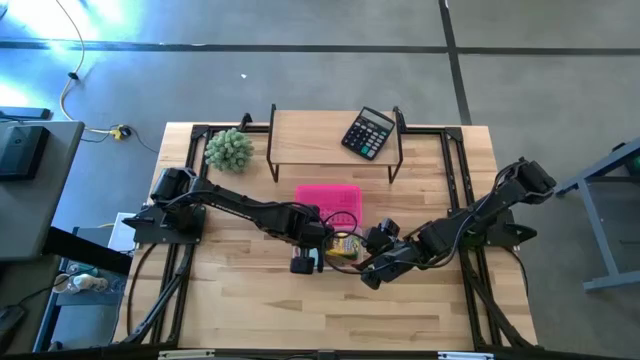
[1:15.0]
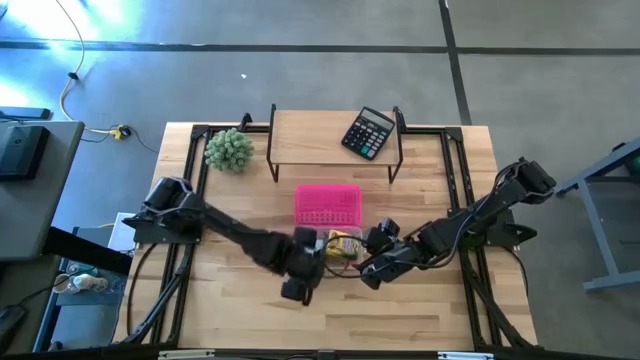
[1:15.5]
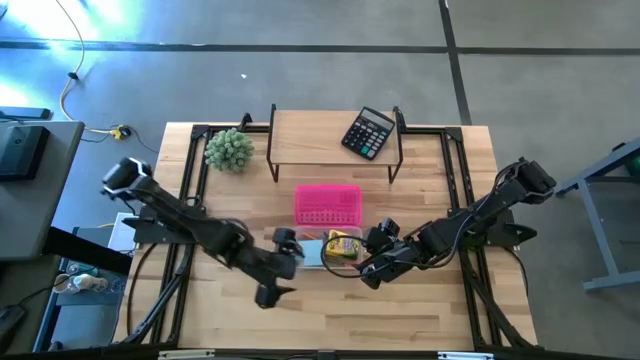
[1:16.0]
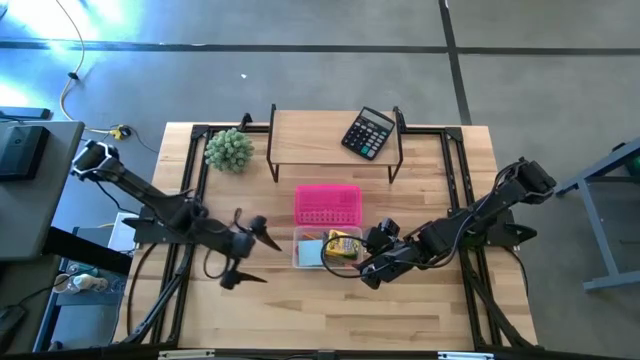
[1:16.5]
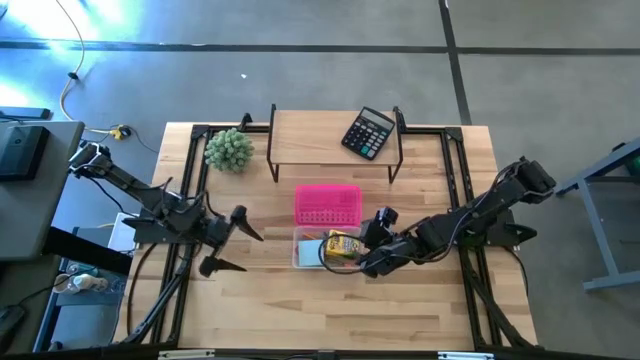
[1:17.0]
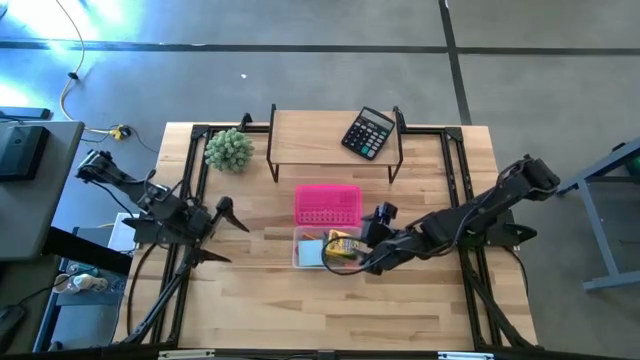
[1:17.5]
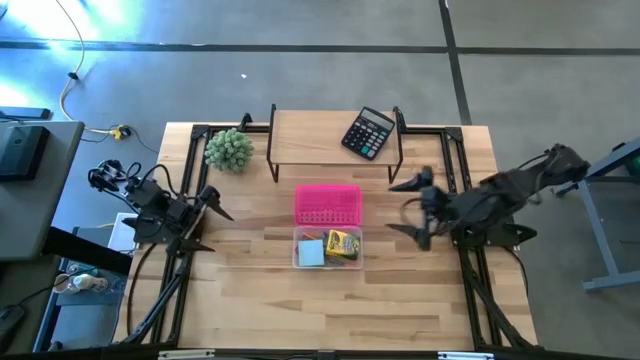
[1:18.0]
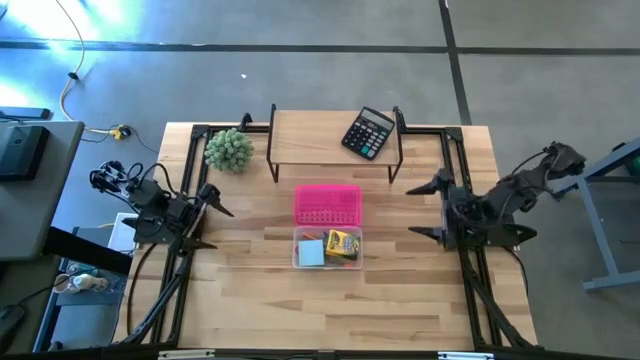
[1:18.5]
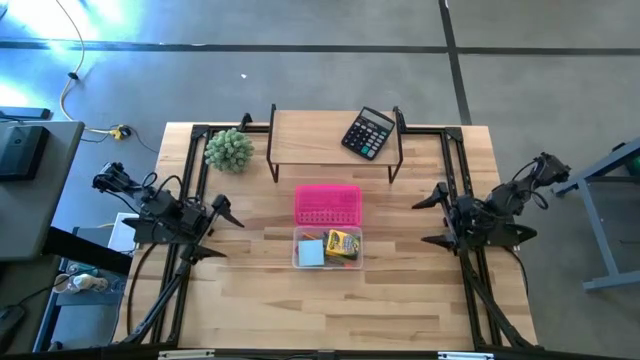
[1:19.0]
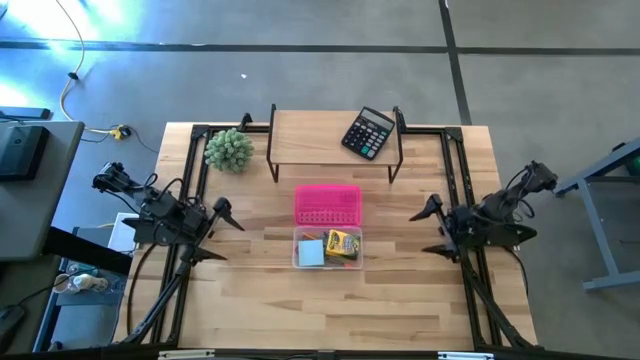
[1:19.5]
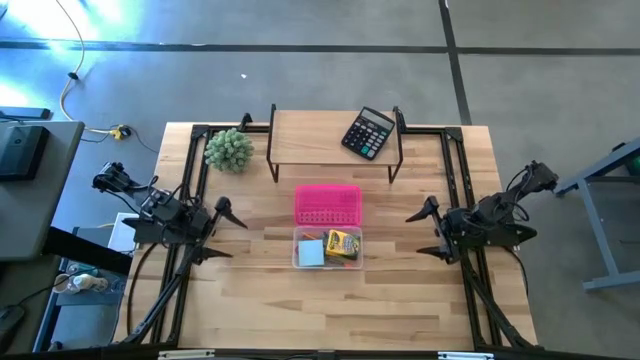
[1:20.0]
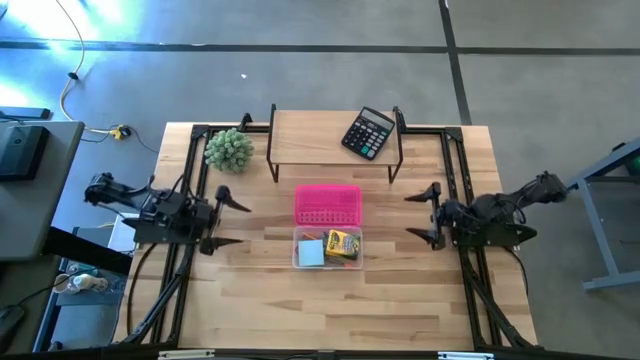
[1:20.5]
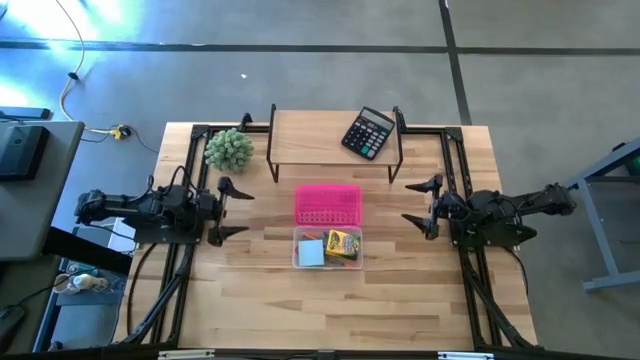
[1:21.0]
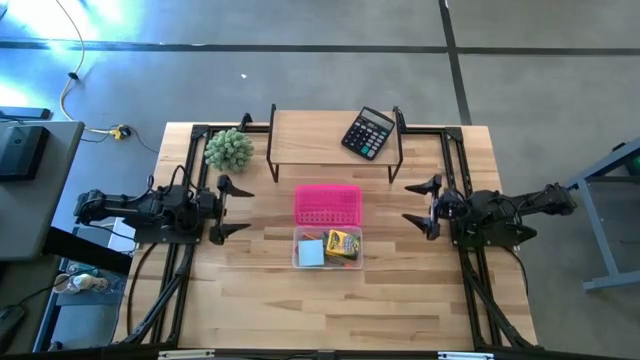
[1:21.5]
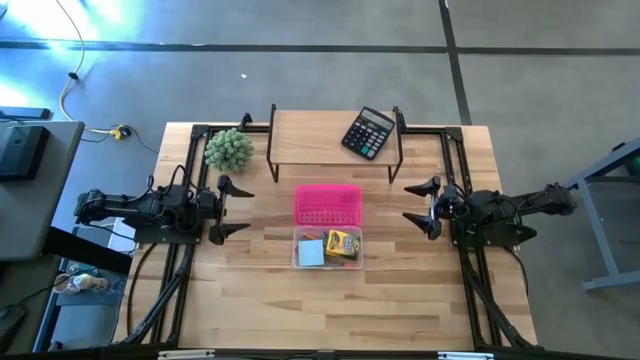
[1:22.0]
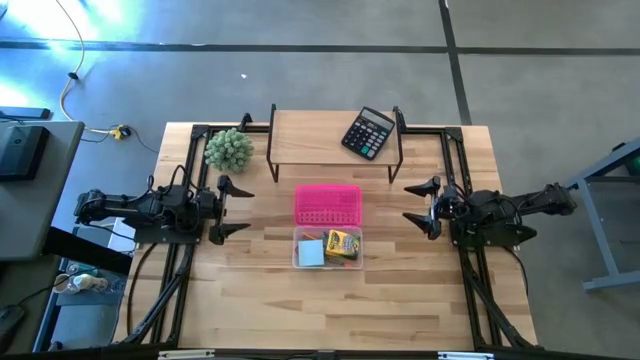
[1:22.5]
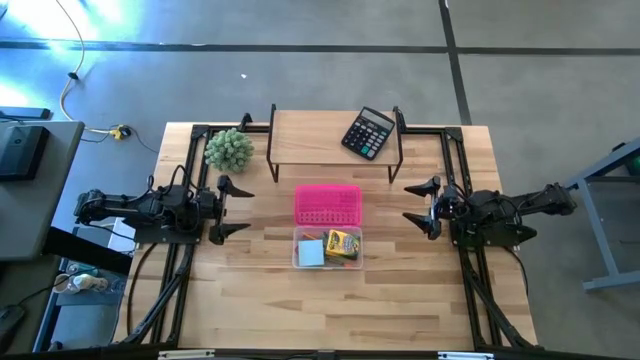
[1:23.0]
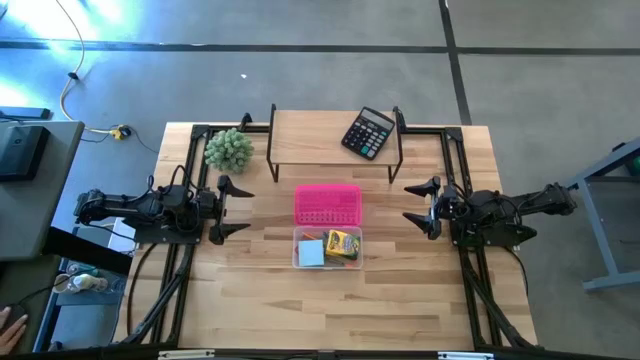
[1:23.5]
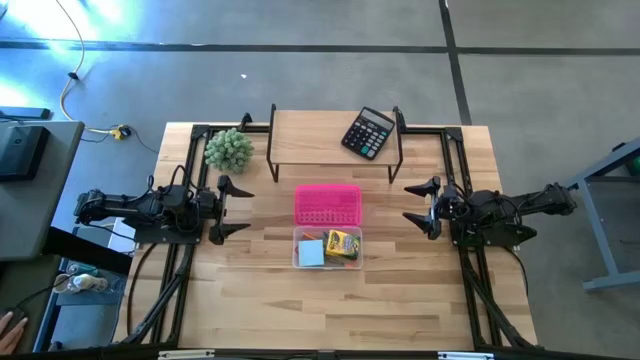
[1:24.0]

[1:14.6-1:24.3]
Task: Pack school essentials
Return to Home Position

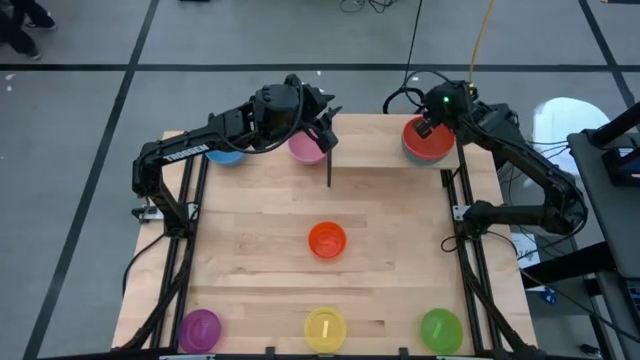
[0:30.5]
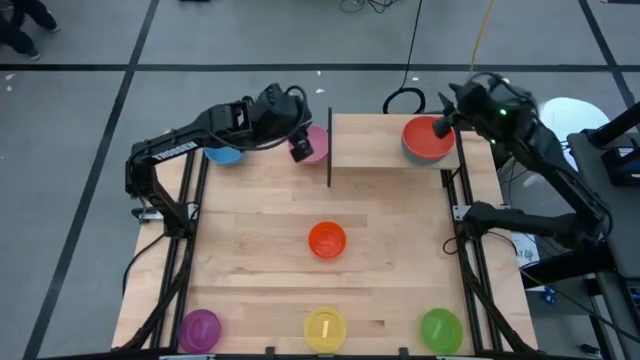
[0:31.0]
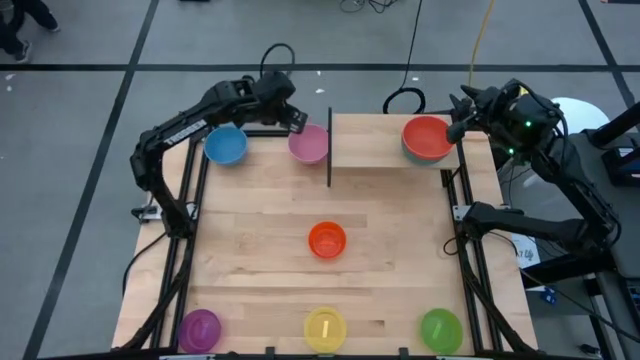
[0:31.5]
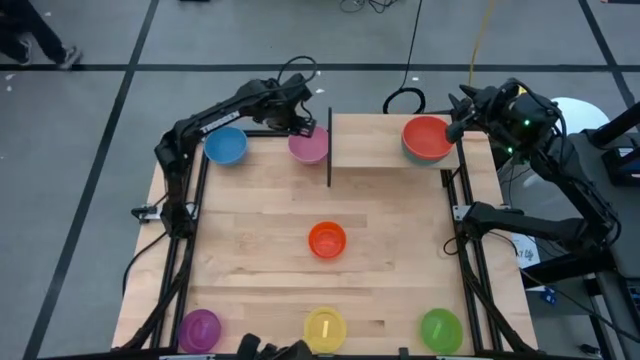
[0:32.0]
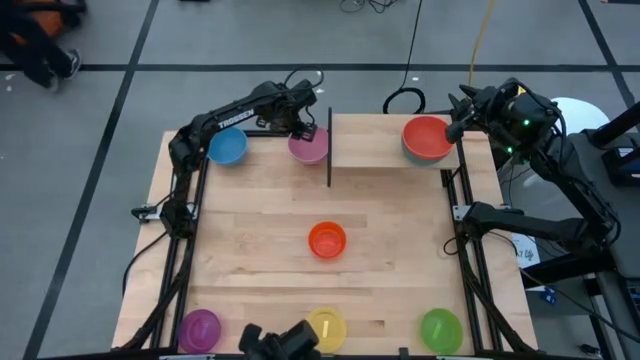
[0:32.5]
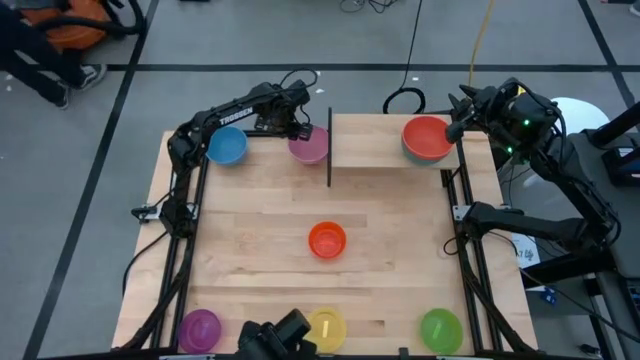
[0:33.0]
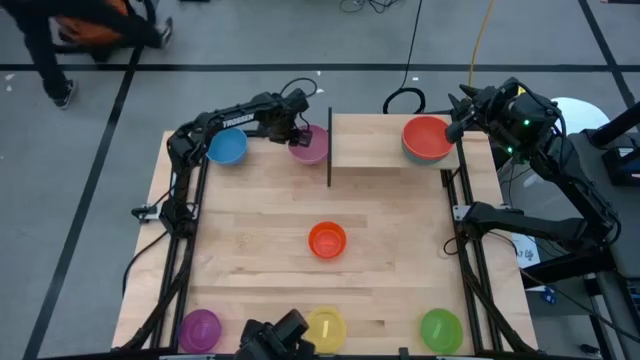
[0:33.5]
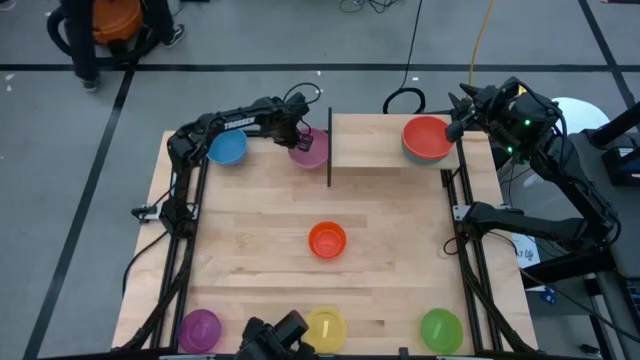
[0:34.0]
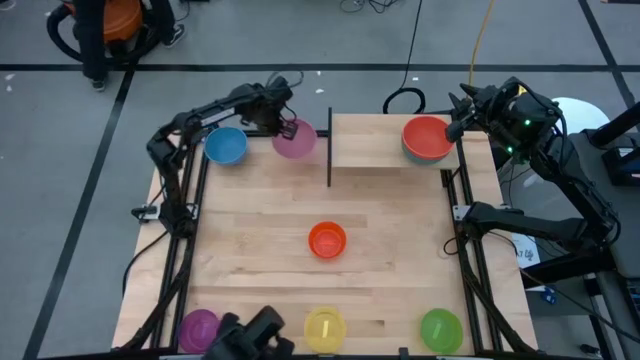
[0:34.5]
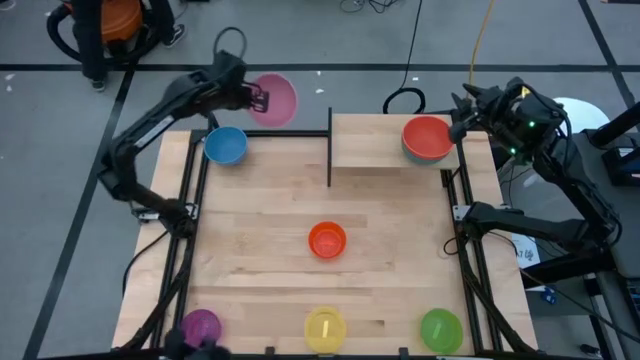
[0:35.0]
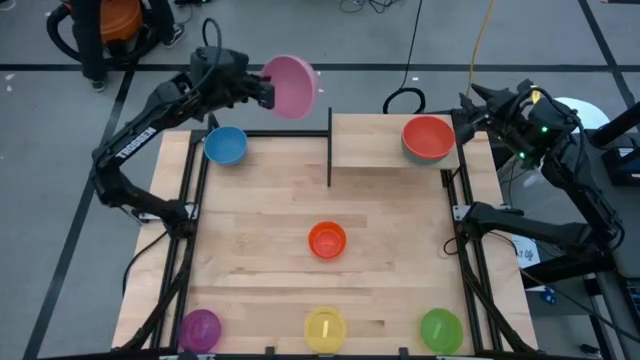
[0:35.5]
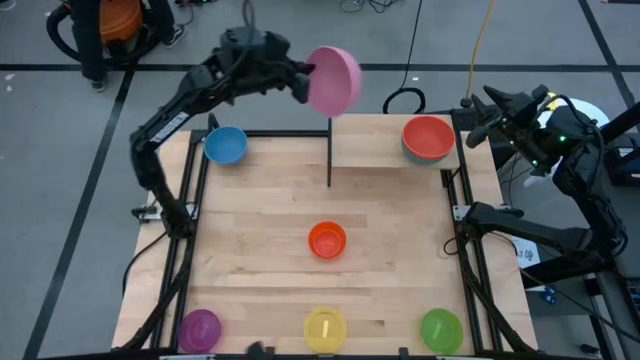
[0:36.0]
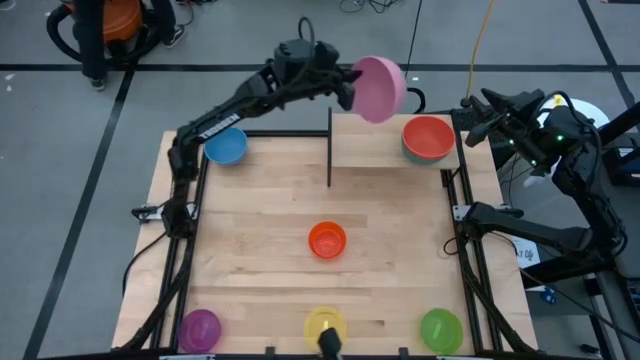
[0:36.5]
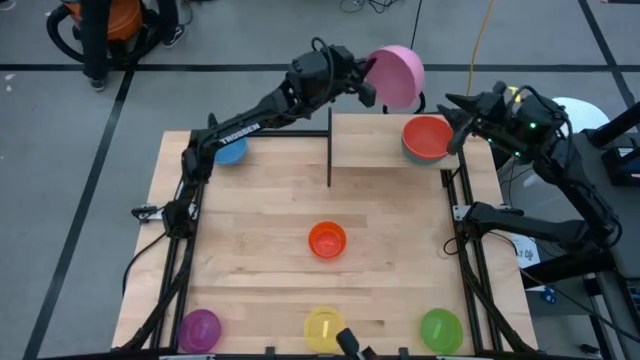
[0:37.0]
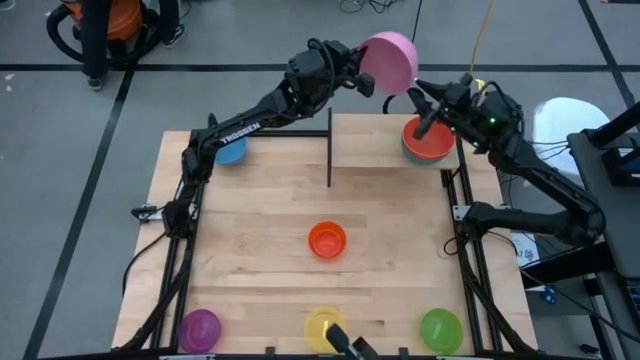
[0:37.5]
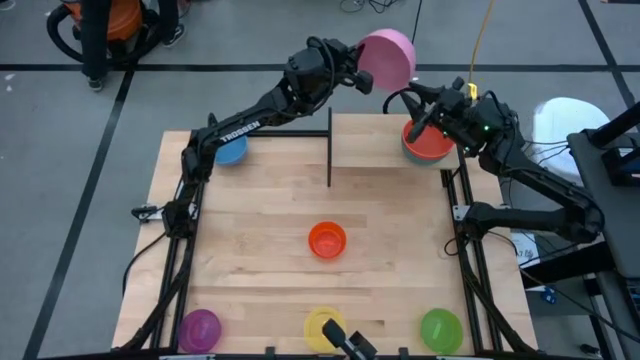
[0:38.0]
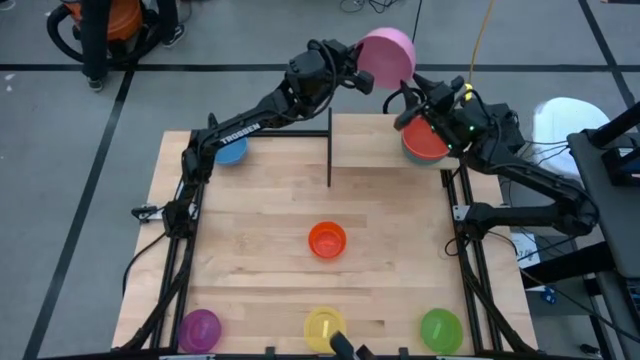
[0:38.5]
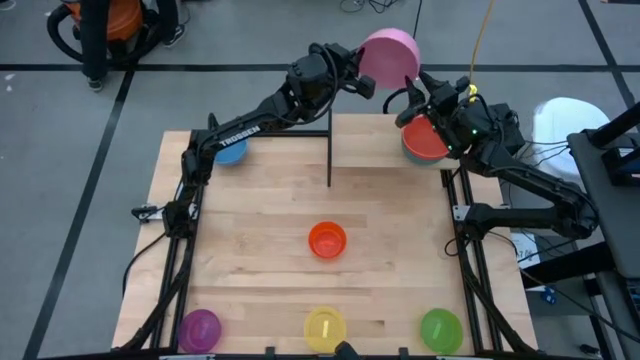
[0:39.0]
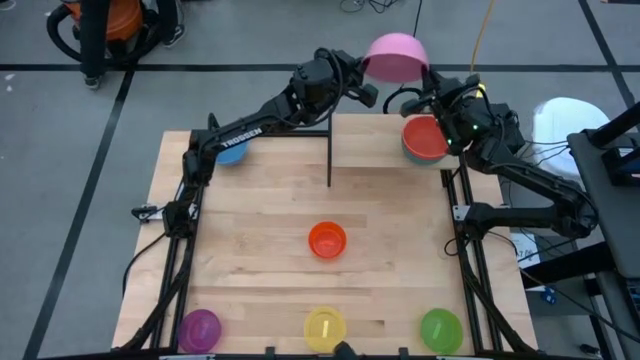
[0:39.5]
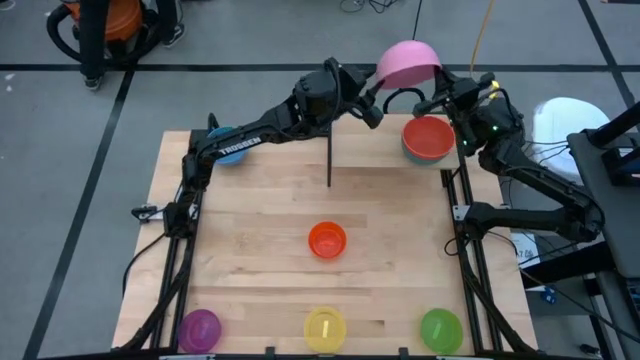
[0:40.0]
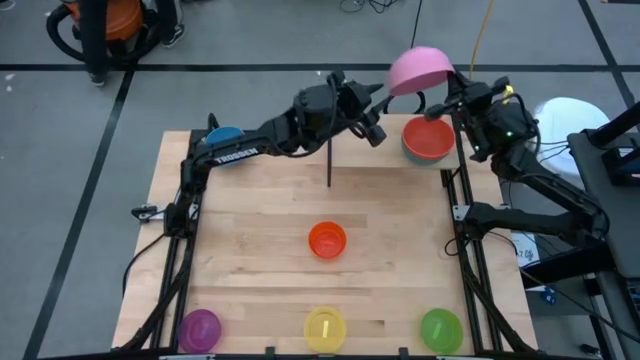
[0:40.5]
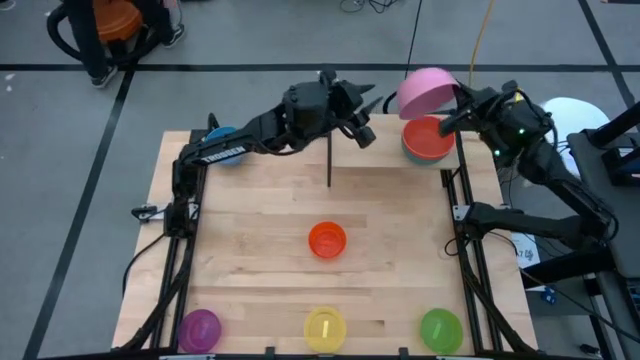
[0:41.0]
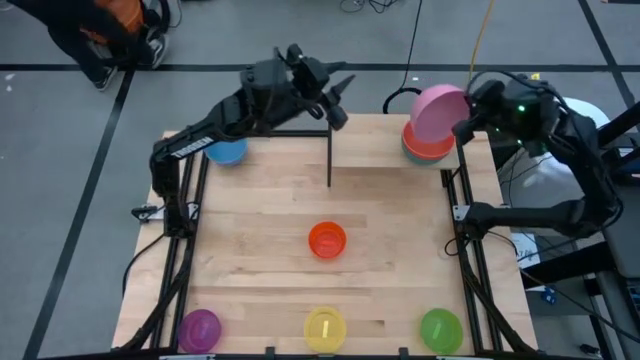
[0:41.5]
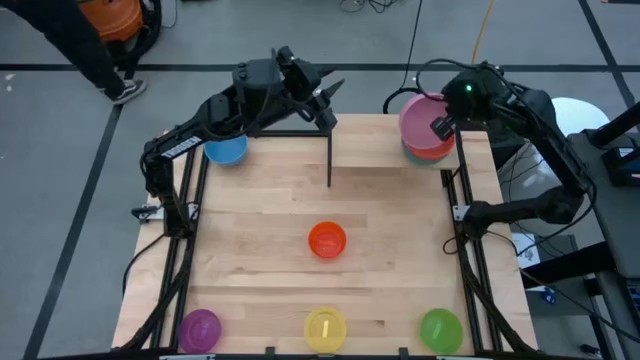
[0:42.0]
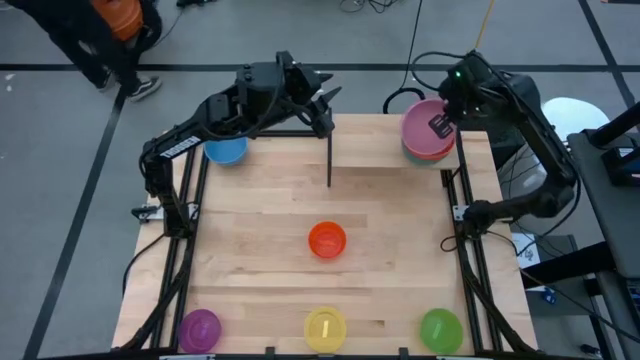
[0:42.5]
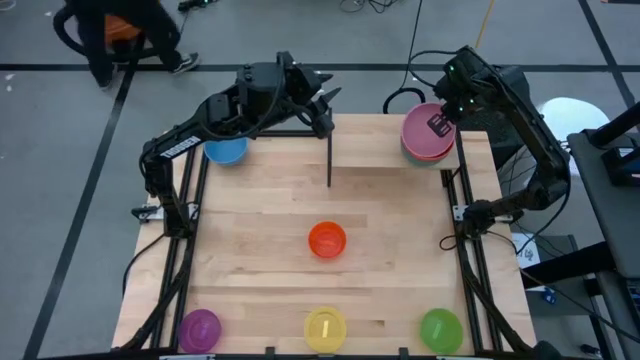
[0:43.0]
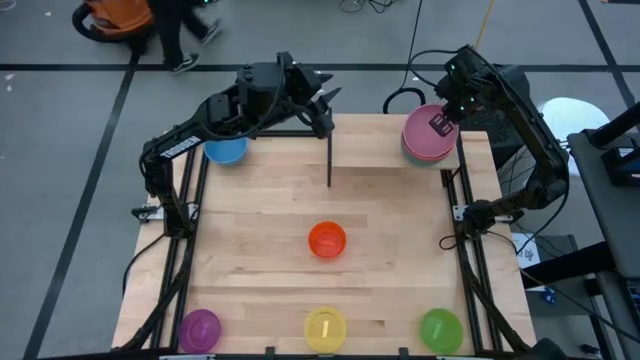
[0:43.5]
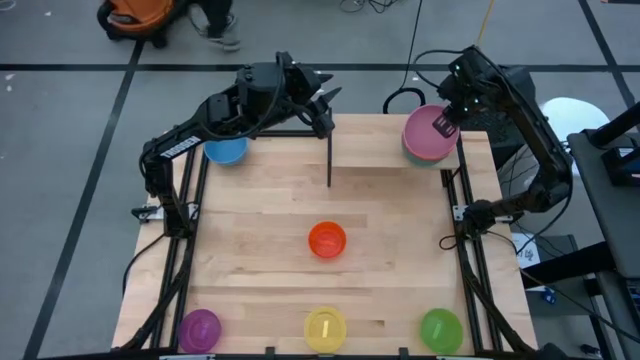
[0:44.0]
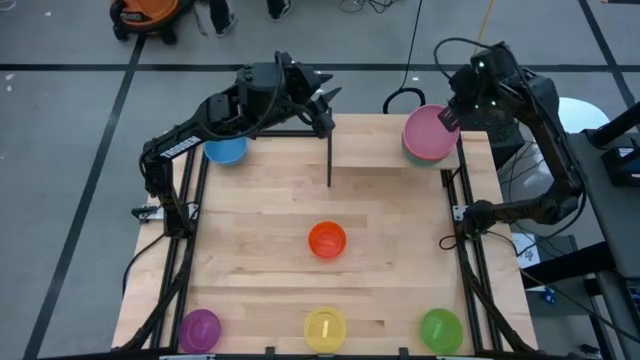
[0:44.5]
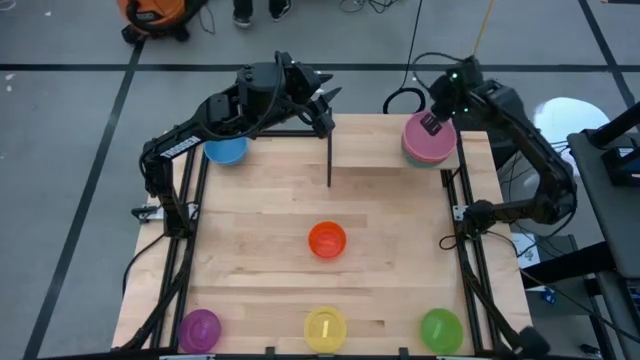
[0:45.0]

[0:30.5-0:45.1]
Task: Place and stack bowls onto a shelf
Stack the pink bowl inside the orange bowl on the shelf
